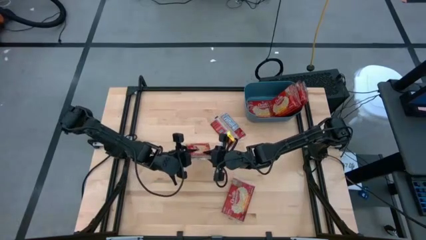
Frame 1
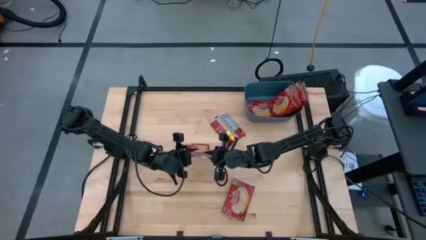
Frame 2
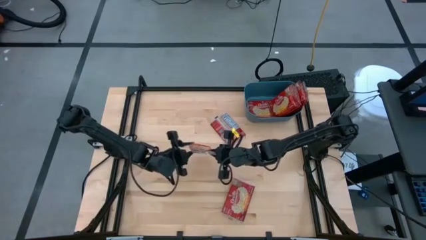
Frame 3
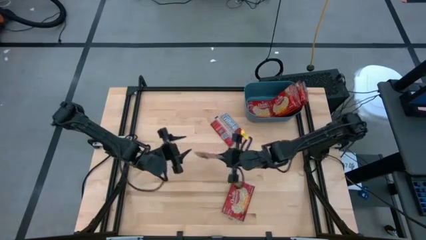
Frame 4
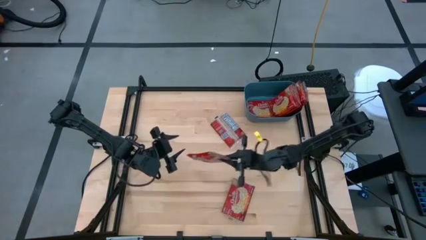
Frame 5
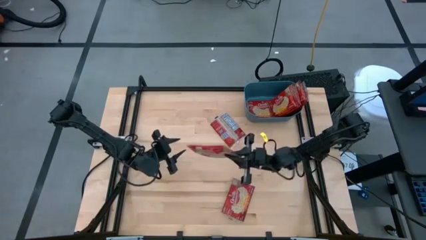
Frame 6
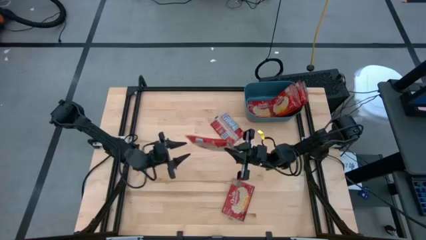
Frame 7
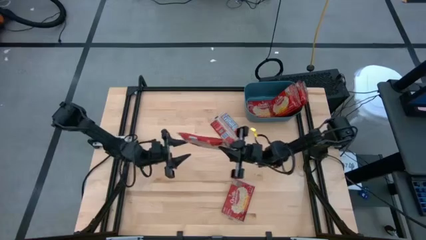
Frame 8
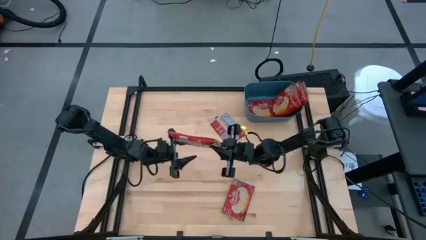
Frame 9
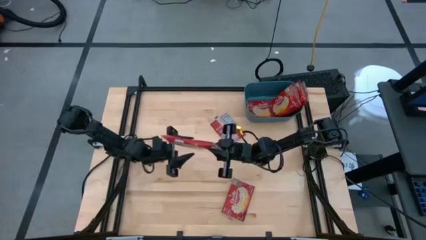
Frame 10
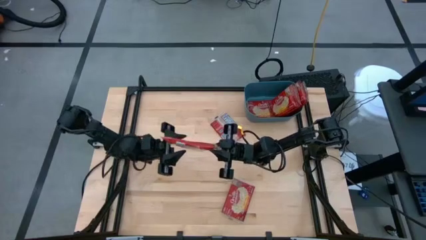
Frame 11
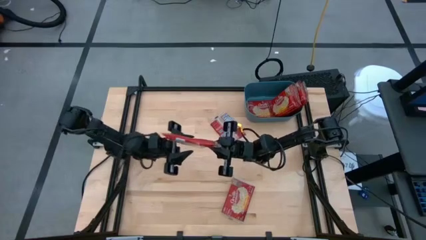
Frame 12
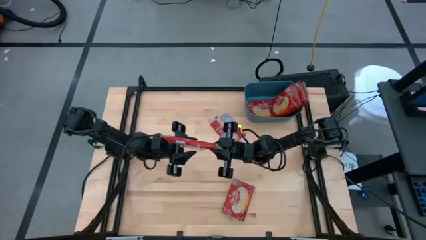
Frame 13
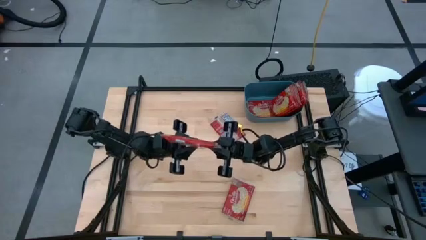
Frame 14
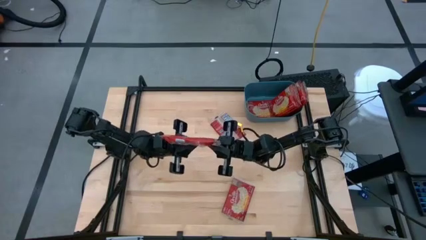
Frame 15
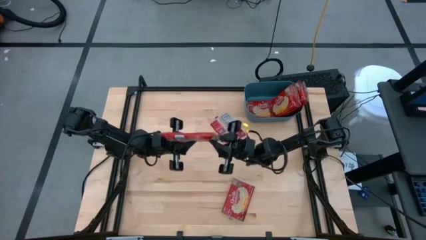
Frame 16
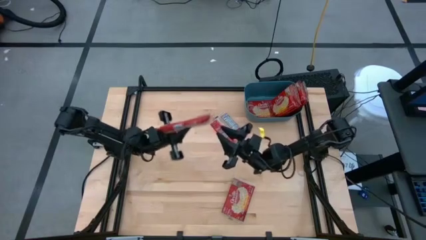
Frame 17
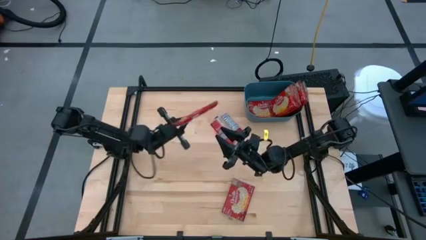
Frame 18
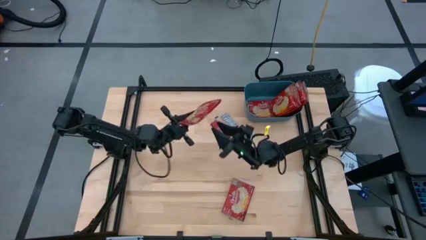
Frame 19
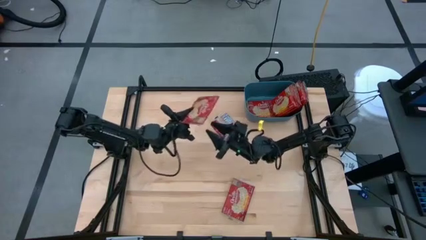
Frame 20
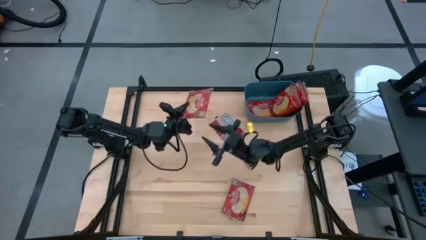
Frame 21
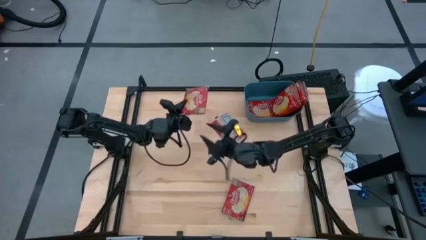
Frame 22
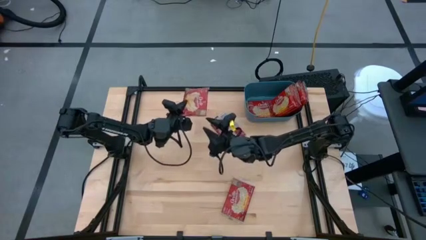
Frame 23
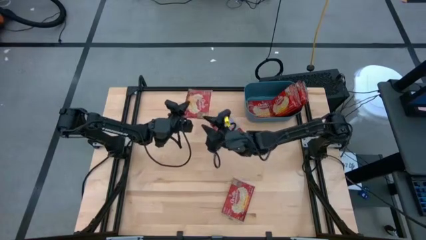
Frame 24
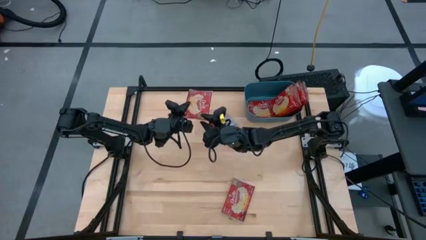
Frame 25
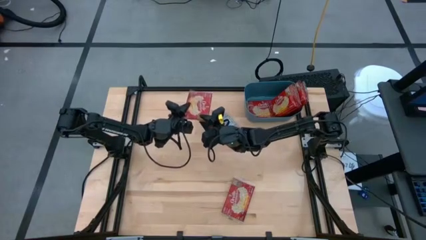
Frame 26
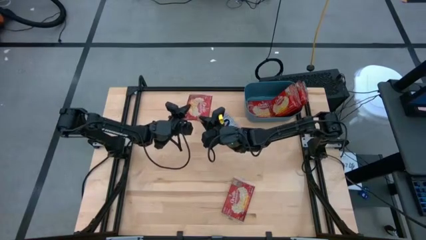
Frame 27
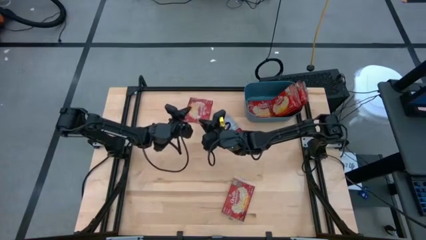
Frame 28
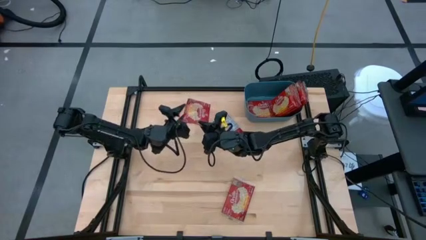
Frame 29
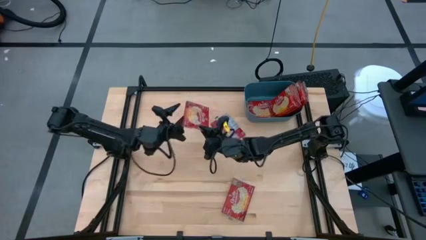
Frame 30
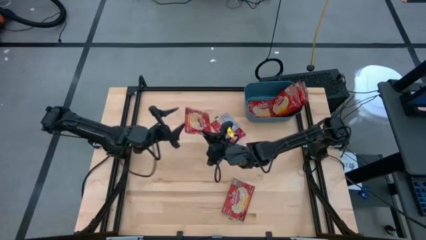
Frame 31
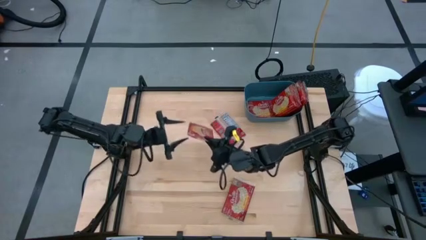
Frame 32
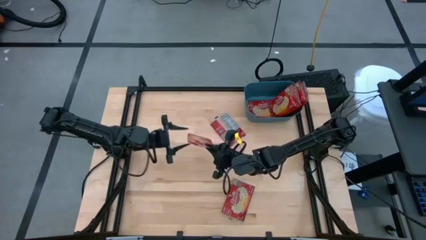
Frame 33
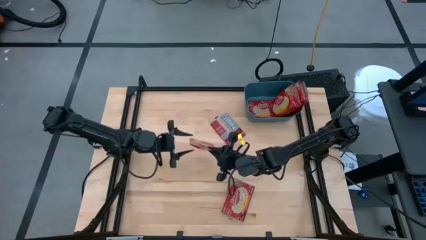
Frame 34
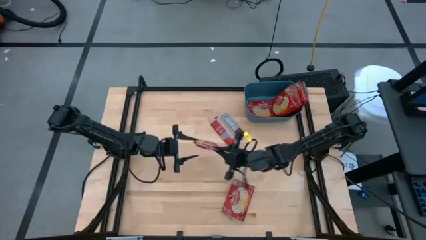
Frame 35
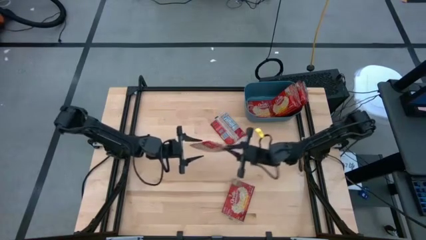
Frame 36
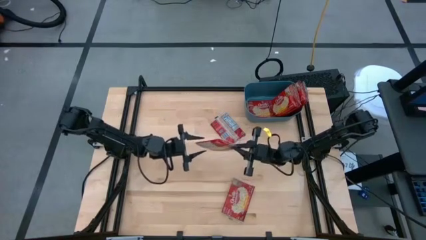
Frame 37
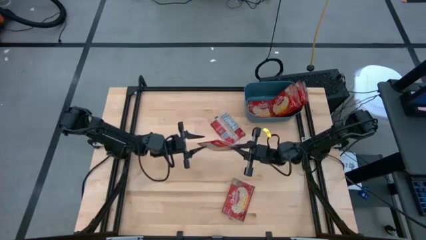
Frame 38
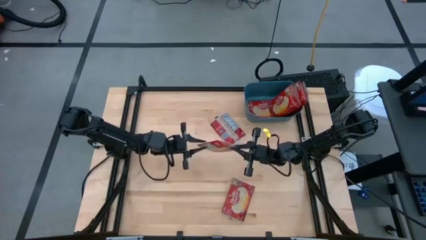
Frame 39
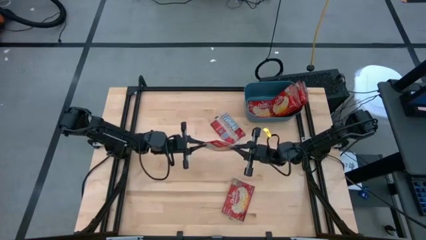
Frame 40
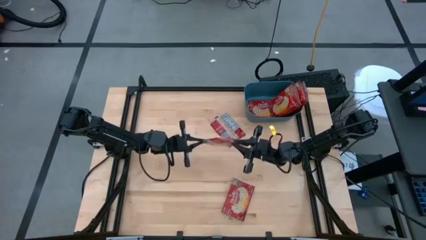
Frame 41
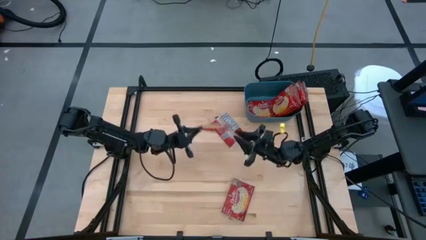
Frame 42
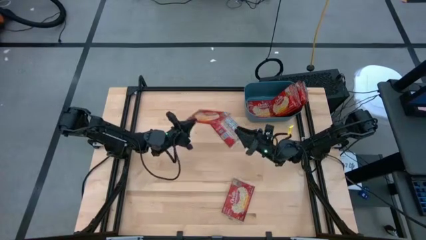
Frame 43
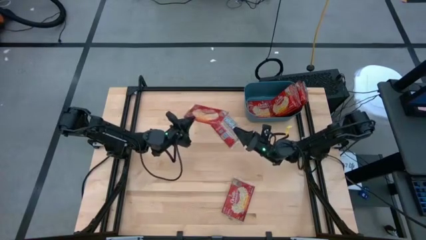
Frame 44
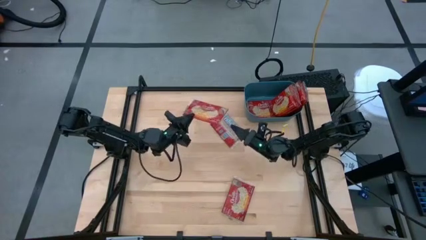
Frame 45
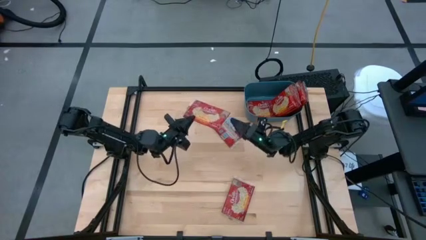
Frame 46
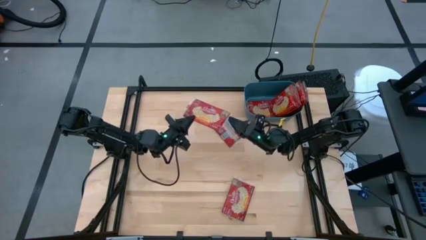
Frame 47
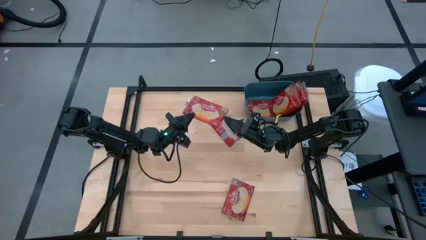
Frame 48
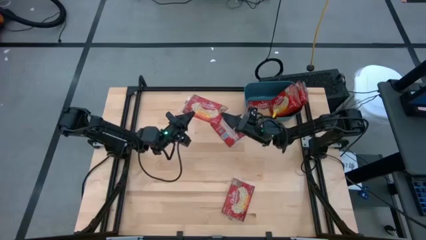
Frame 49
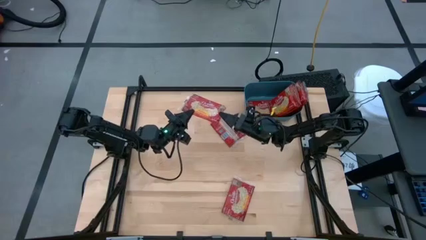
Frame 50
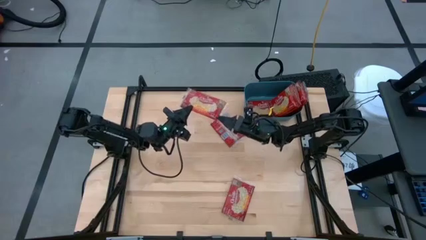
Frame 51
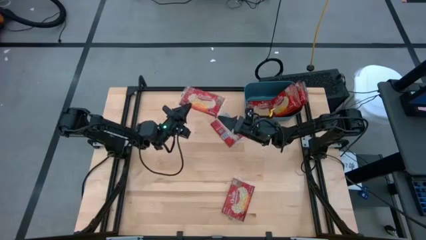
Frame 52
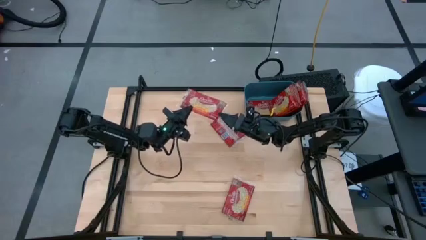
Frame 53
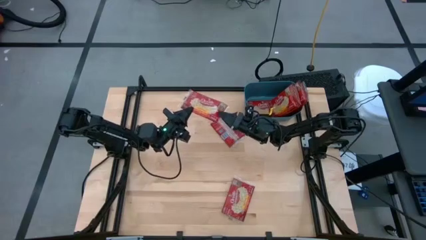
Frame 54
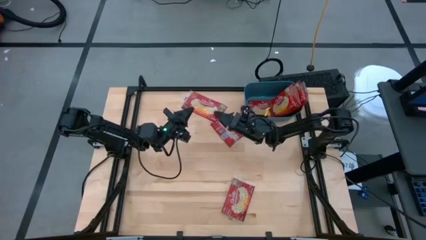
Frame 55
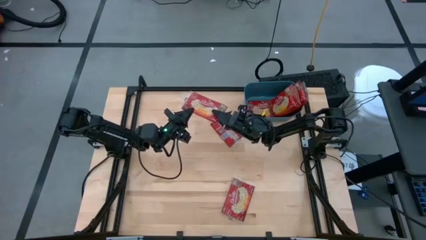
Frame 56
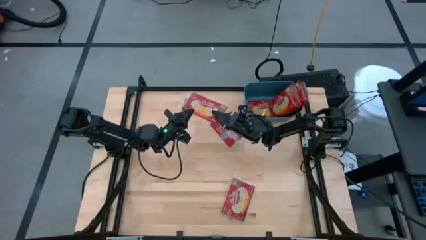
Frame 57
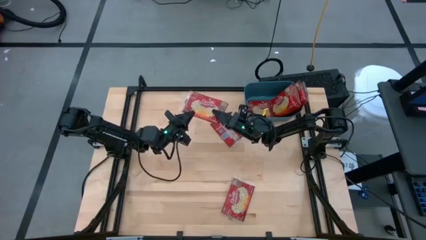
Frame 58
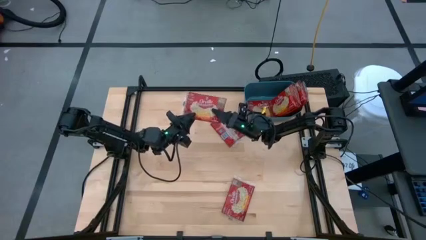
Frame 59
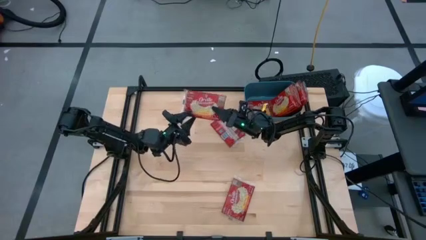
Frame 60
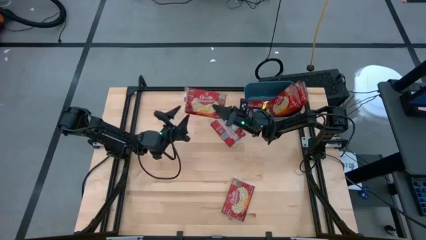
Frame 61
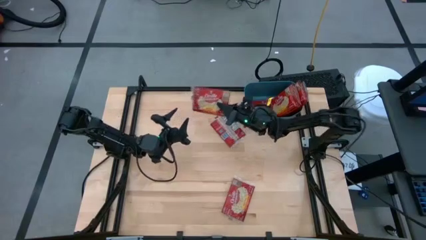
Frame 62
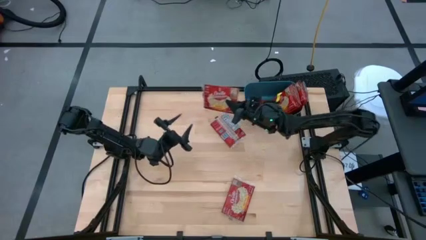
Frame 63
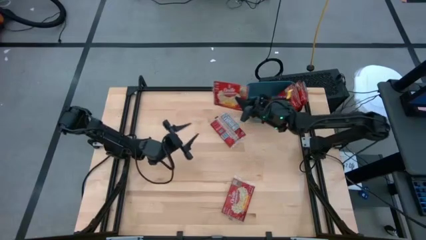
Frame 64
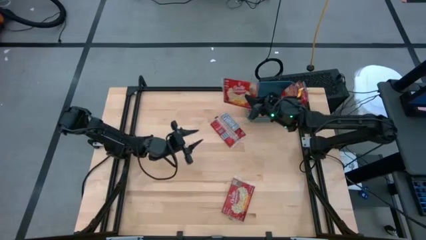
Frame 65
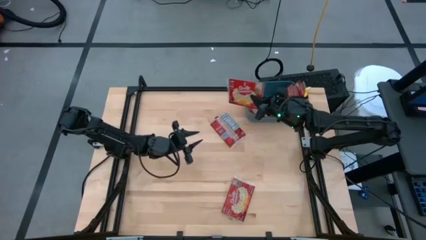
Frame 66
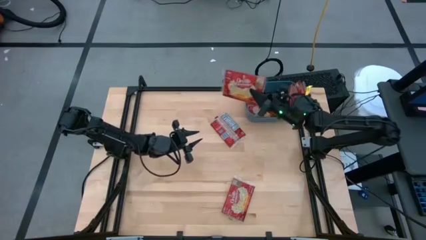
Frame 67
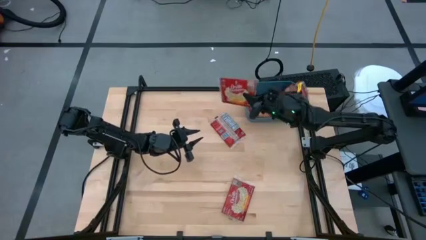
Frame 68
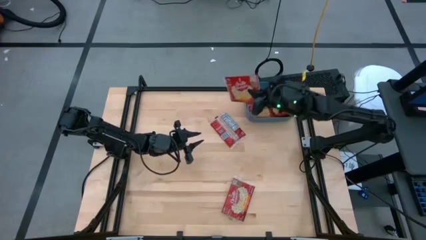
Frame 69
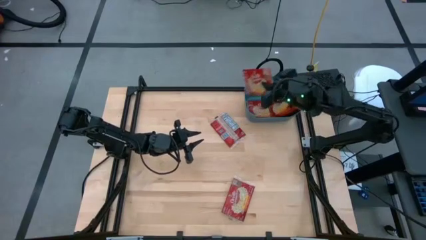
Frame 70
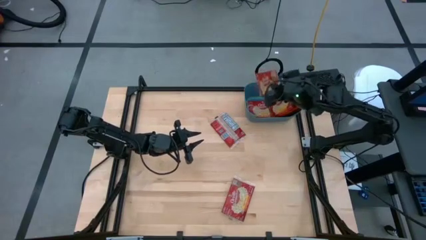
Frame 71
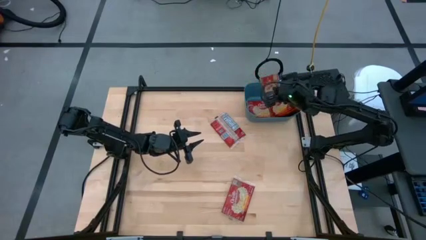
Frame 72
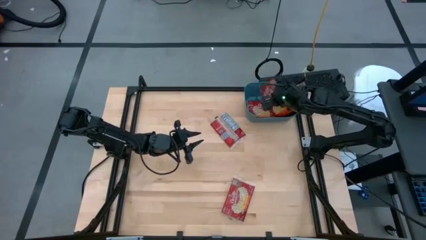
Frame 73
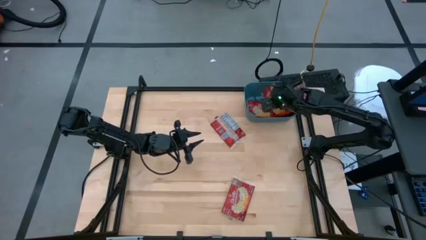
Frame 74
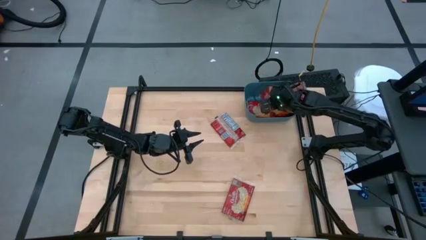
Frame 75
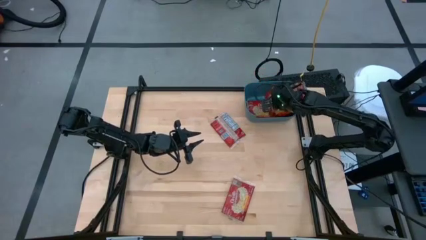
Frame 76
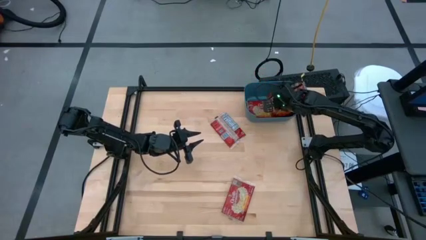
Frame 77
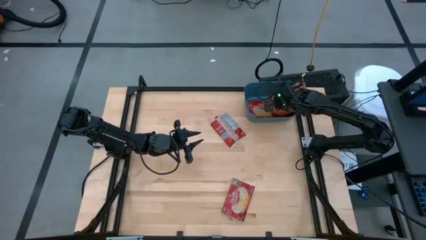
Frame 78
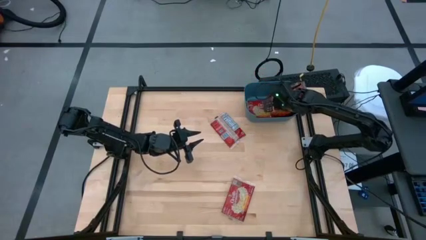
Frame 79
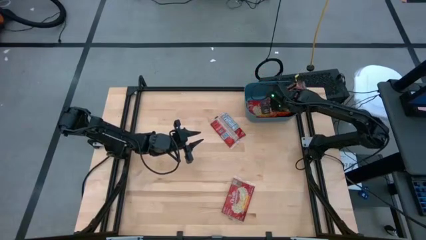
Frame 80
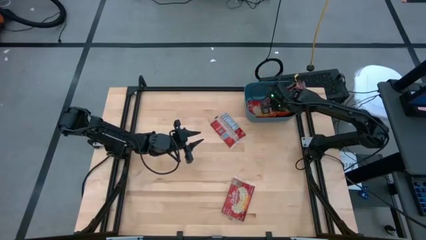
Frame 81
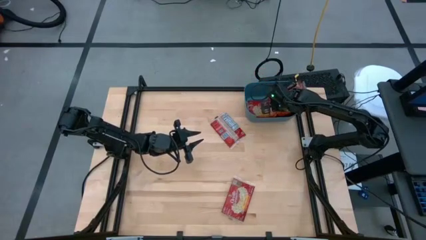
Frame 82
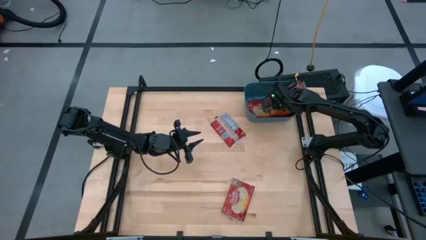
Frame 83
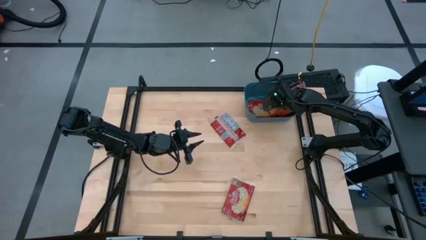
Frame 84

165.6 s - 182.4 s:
Task: Sort popcorn bags into baskets
Put the popcorn bag into the blue bin
